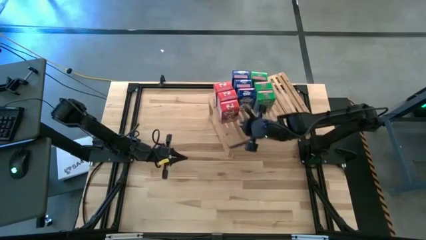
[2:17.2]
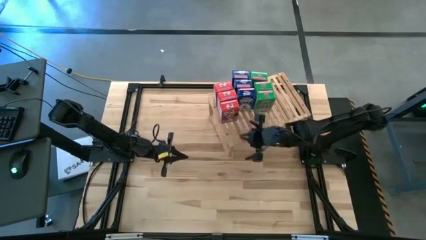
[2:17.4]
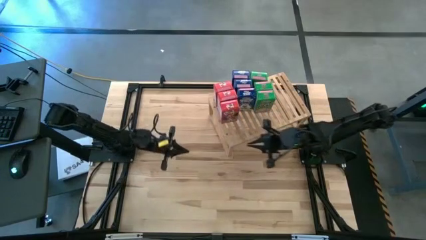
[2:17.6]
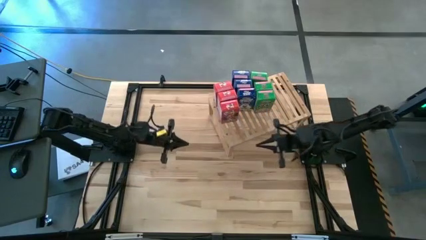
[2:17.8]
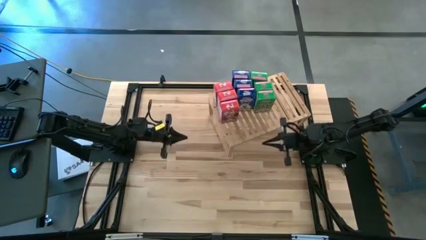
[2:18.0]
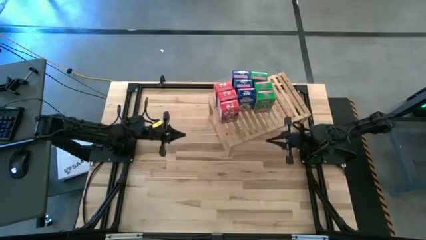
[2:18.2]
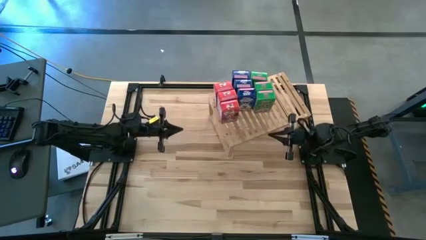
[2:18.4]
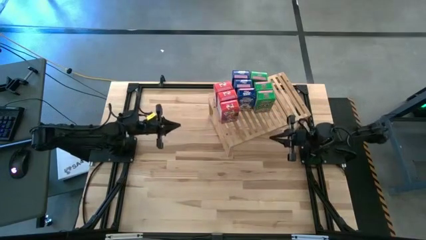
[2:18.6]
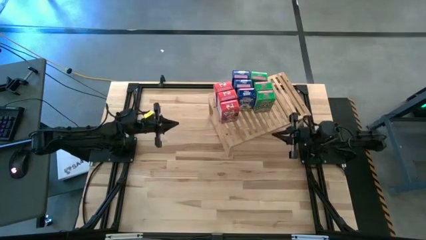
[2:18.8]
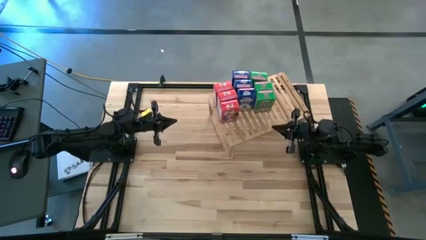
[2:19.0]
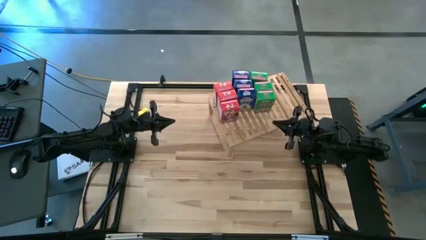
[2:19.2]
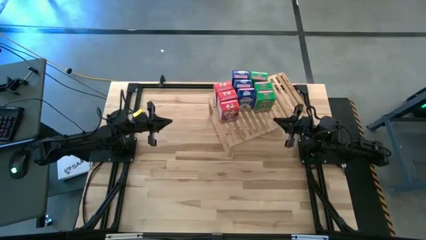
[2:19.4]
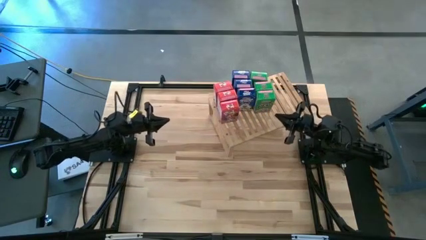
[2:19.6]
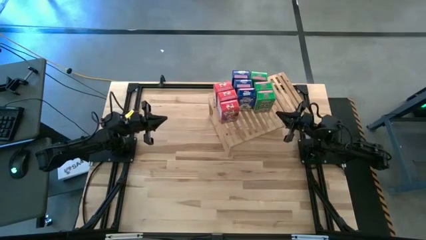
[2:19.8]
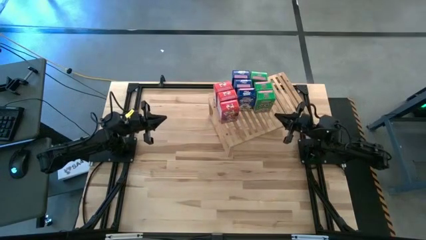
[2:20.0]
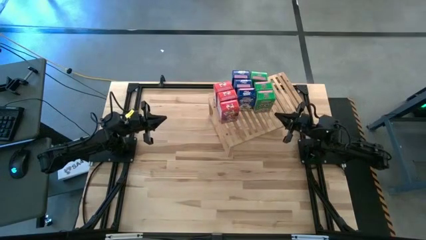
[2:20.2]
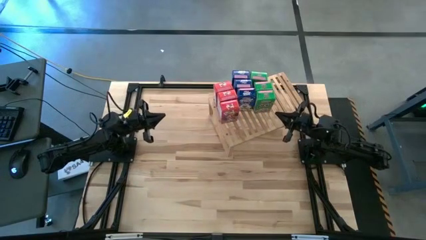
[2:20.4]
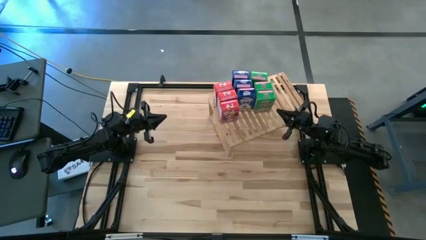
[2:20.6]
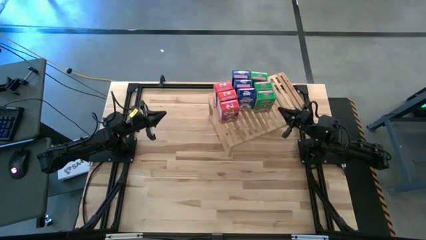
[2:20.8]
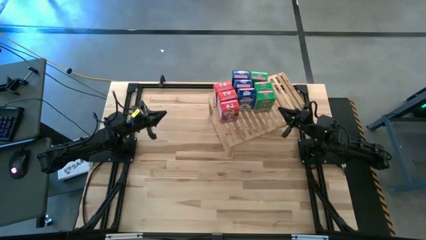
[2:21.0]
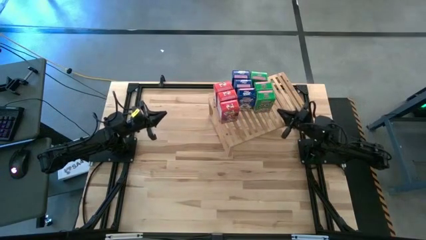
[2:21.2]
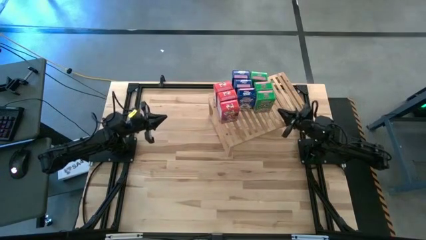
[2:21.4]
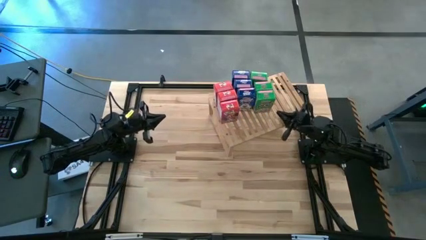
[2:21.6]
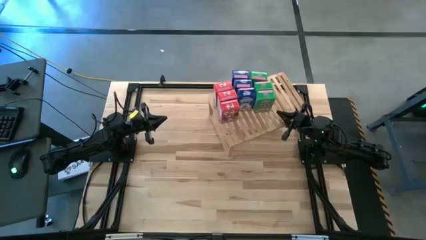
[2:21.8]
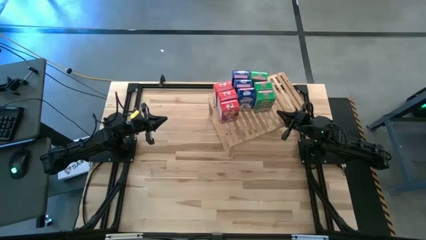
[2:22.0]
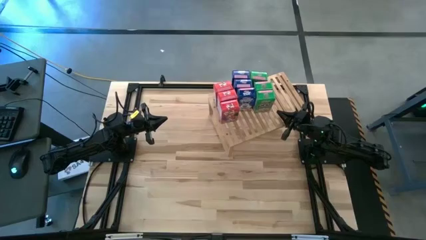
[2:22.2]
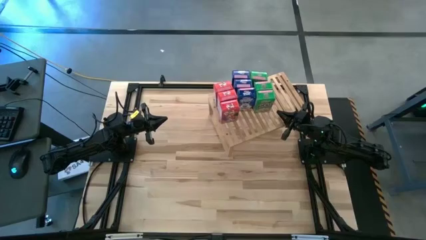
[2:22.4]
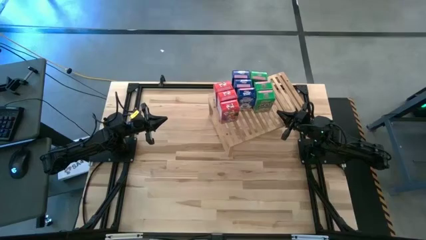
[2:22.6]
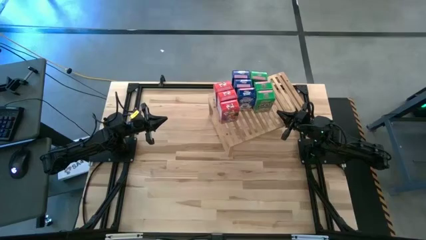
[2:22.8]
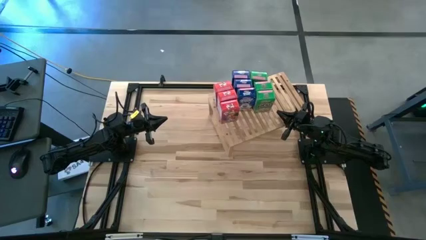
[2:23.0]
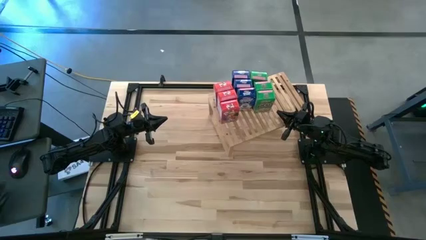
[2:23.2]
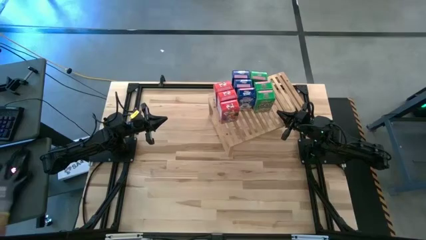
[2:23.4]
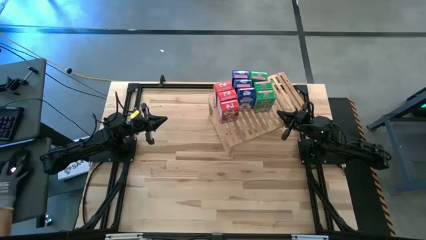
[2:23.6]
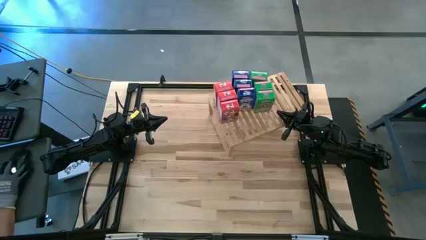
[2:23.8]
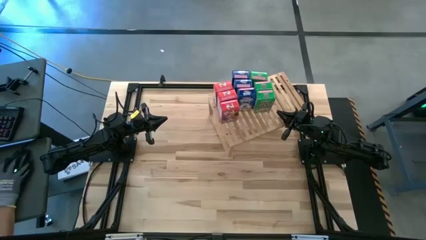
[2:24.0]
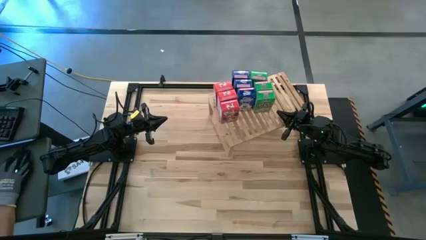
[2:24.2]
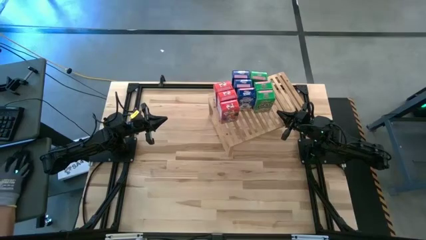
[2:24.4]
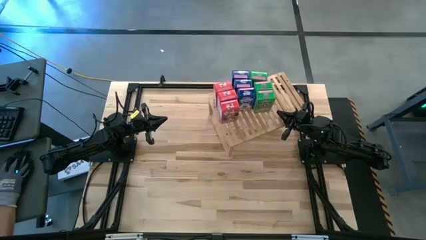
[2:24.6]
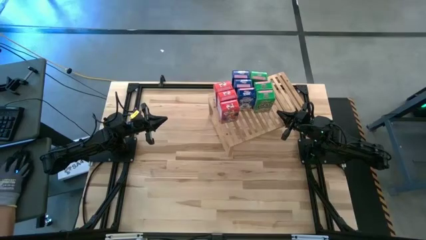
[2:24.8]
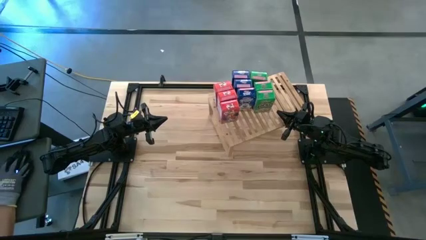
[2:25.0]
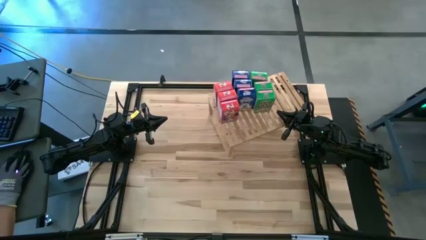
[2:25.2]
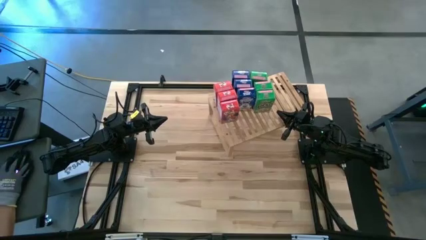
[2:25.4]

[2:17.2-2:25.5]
Task: Stack cereal on shelf
Return to Home Position

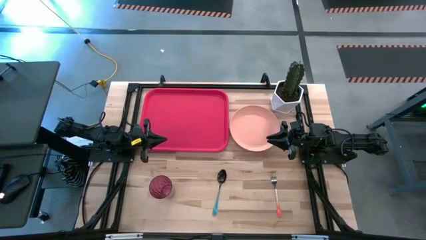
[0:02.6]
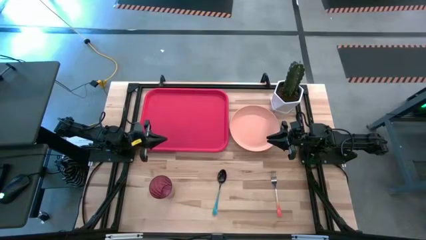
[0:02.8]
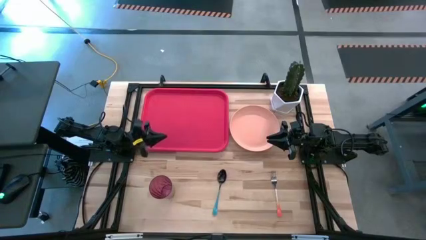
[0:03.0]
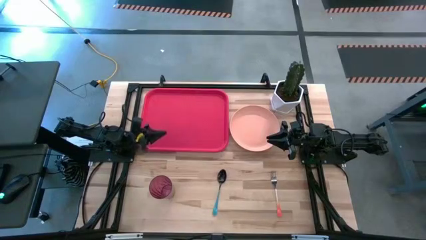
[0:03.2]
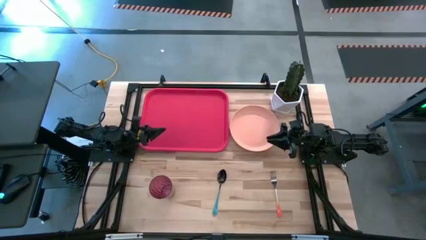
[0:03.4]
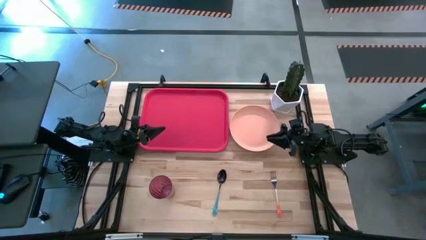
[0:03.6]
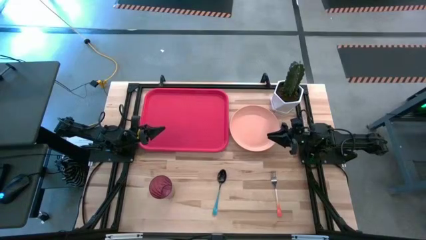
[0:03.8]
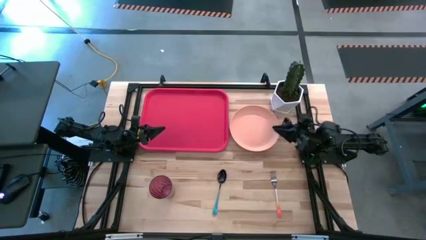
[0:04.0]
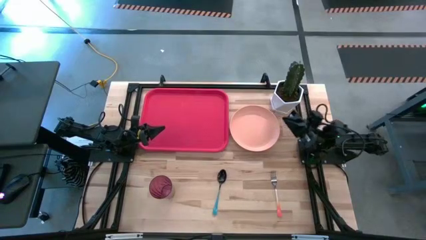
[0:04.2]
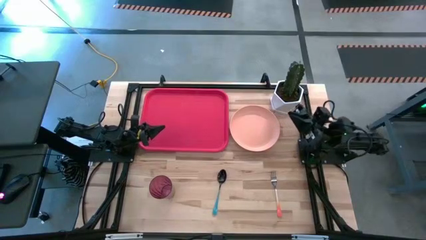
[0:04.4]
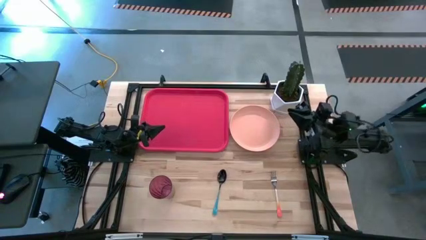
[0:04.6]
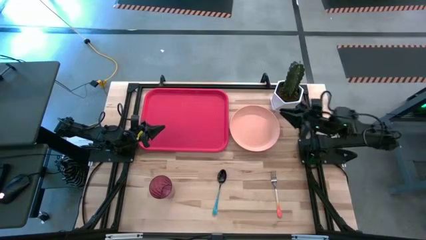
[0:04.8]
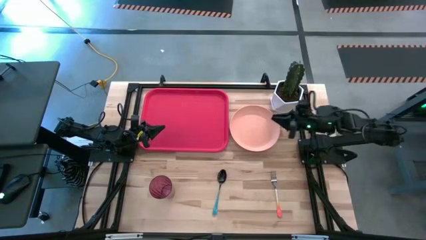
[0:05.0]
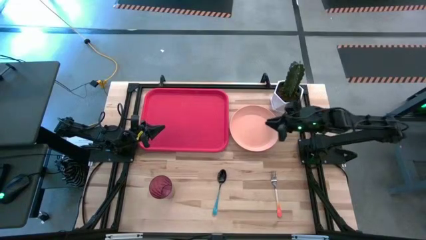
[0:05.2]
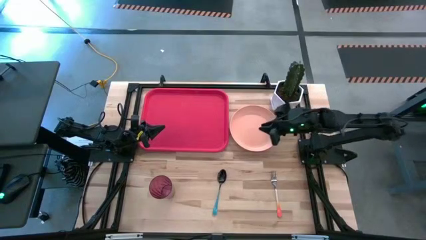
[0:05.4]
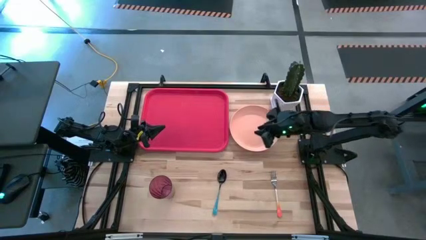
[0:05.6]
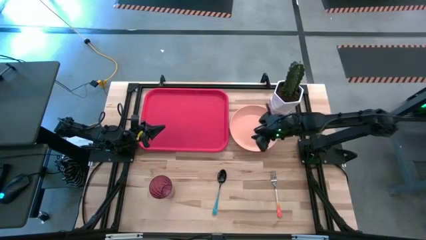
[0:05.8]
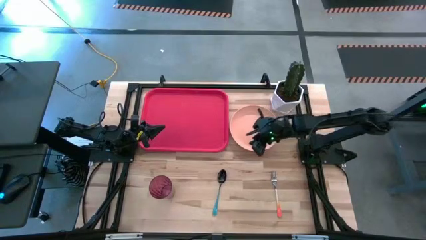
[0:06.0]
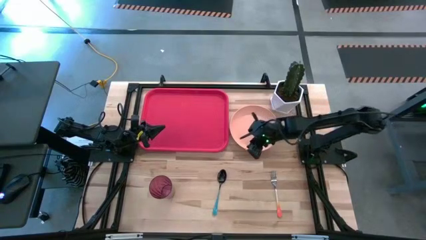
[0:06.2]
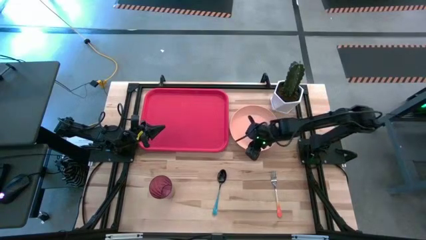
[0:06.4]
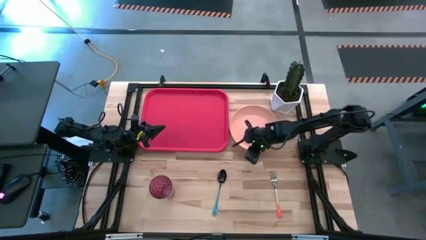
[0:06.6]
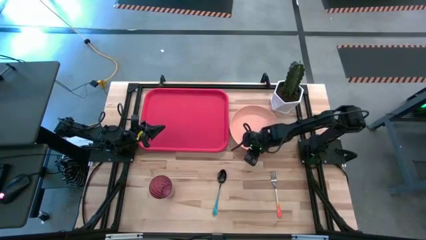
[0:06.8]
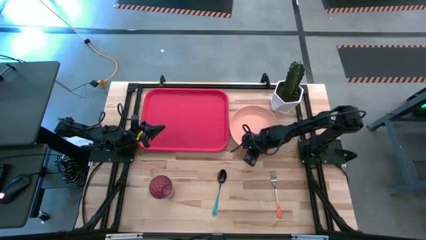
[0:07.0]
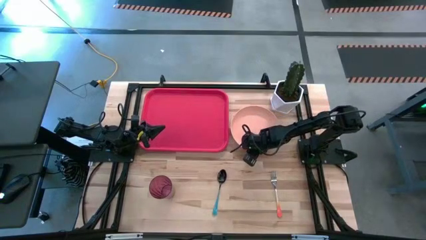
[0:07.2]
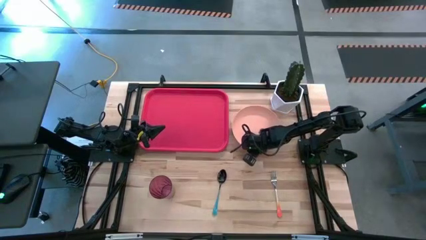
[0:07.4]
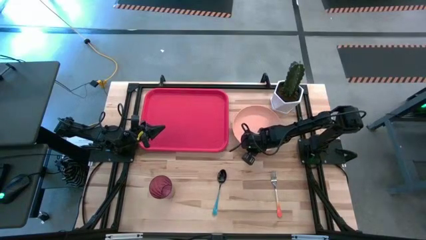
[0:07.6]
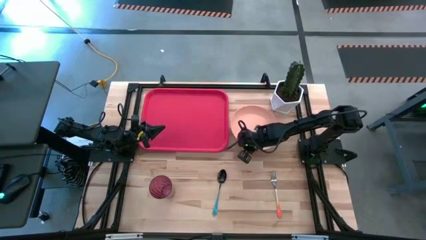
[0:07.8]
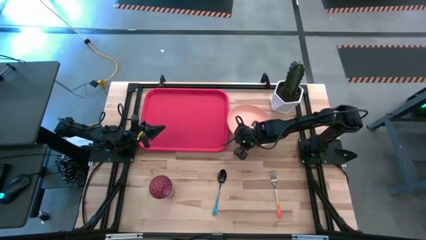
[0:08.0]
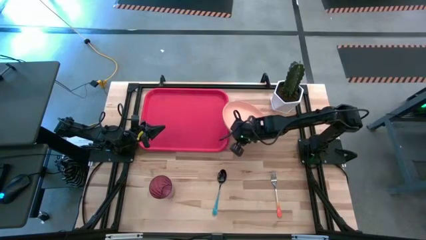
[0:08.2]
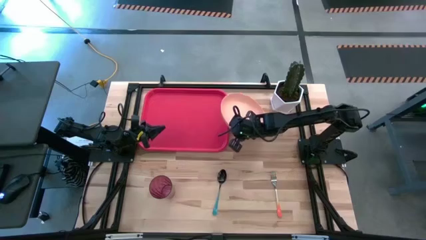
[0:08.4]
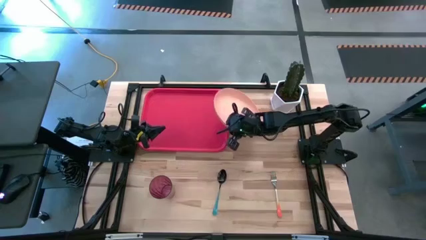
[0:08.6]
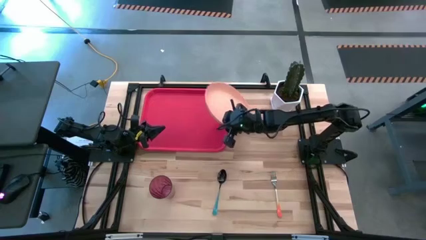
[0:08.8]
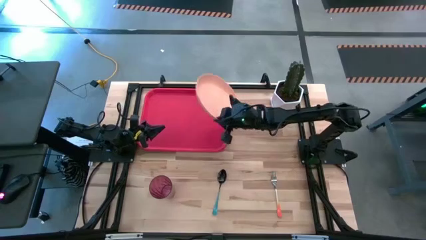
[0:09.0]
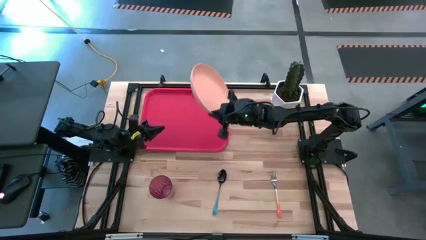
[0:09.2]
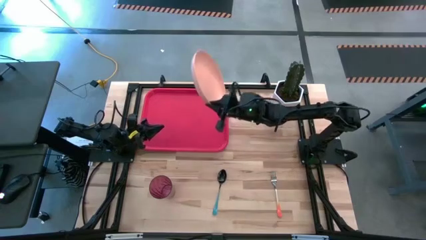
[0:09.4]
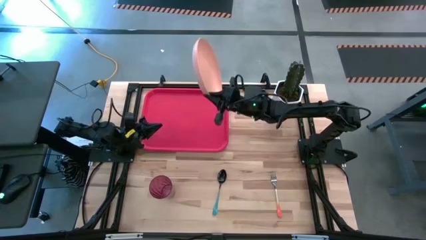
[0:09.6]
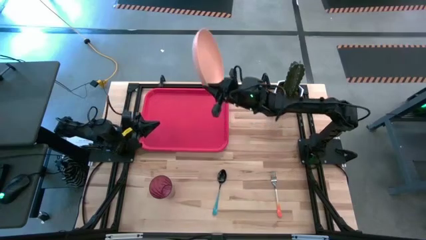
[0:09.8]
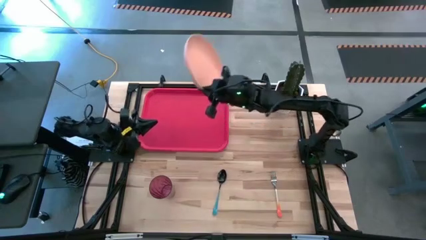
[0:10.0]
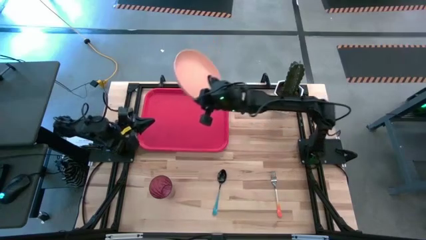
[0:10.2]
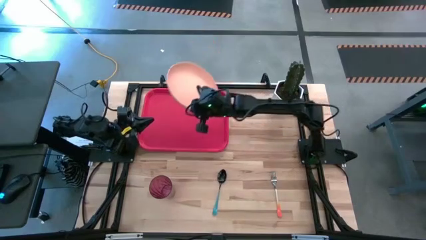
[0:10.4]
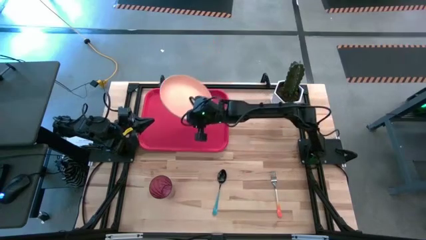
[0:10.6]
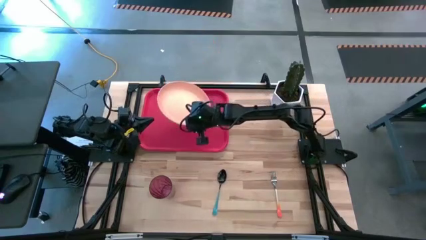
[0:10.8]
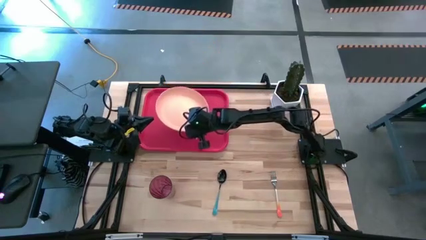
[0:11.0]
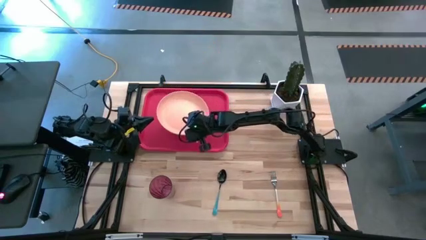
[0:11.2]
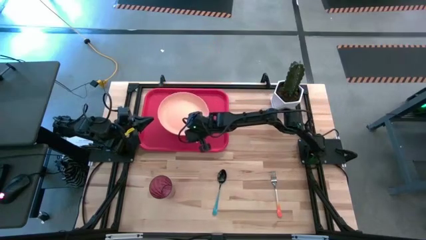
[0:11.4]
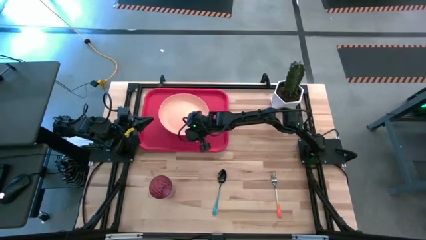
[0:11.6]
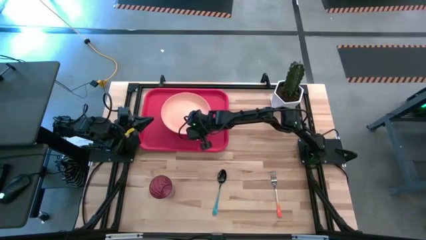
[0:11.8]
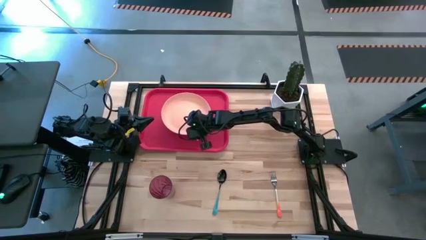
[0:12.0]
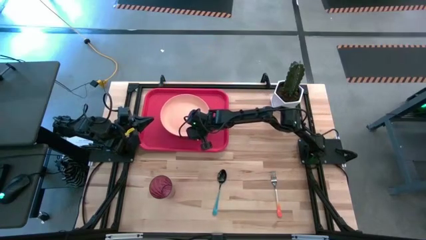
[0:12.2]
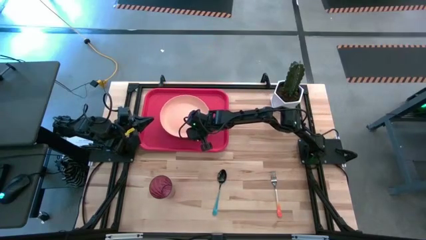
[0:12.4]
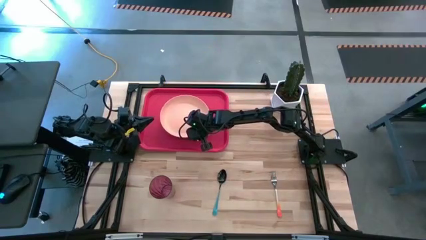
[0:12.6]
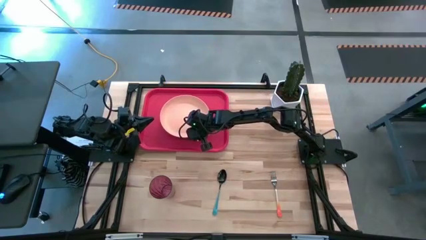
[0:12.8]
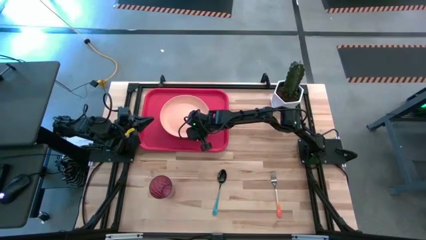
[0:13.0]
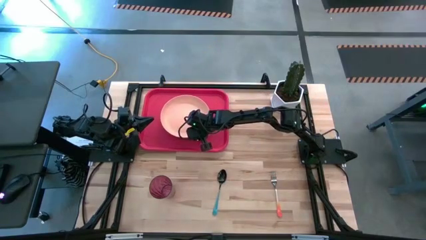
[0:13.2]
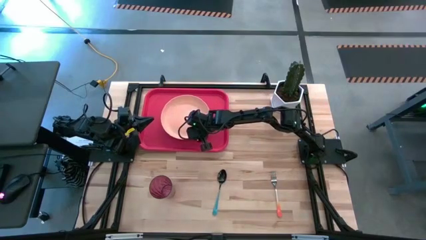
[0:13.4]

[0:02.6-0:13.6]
Task: Pick and place plate/cup/fork/spoon on tray
Put the light orange plate on the middle of the red serving tray
